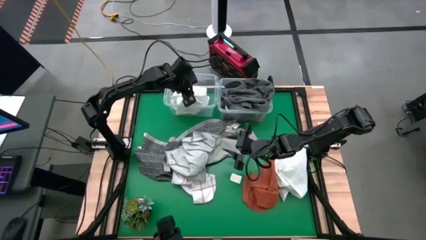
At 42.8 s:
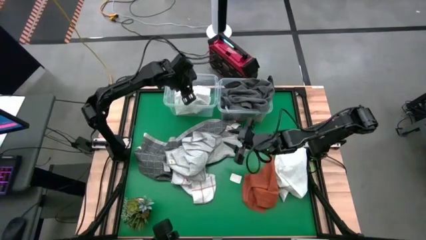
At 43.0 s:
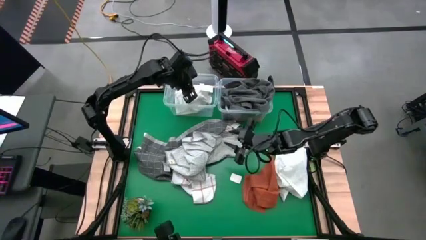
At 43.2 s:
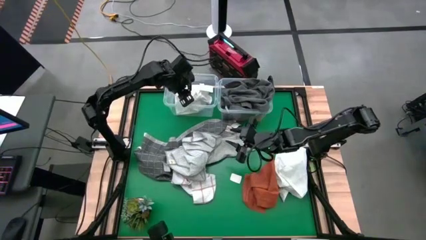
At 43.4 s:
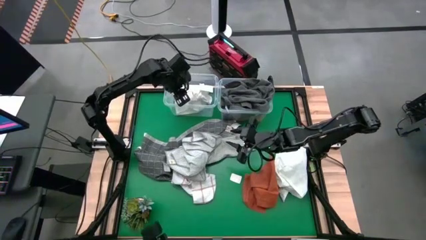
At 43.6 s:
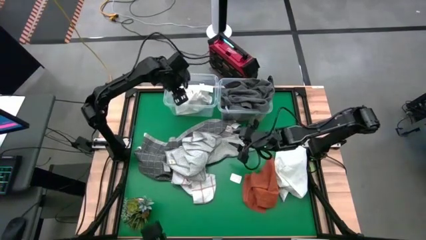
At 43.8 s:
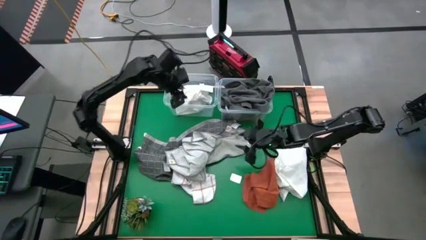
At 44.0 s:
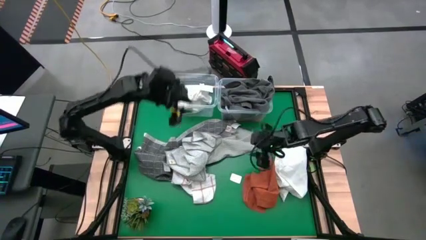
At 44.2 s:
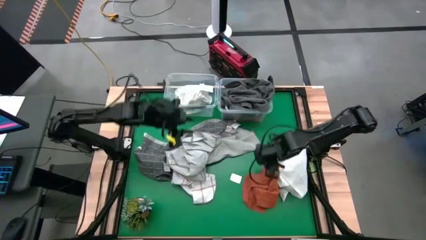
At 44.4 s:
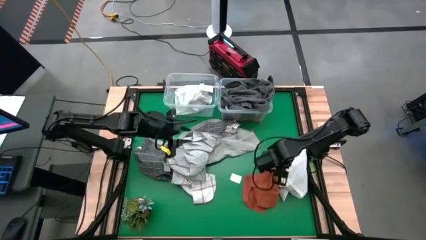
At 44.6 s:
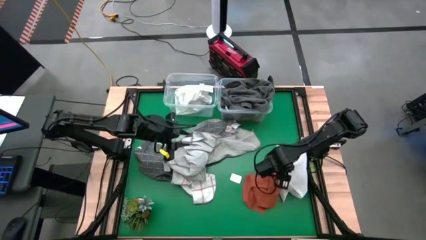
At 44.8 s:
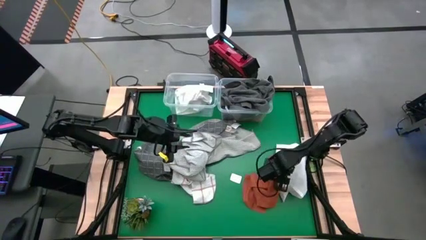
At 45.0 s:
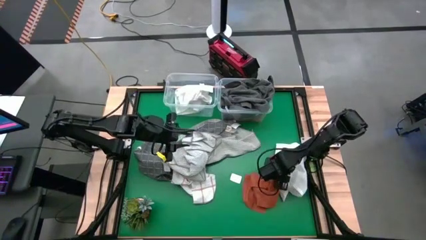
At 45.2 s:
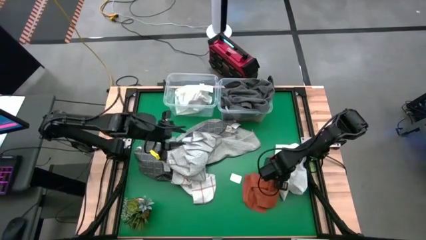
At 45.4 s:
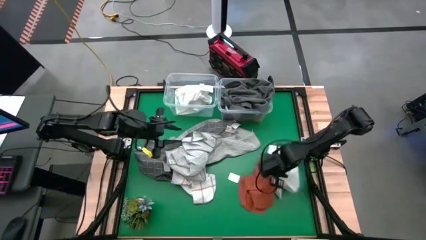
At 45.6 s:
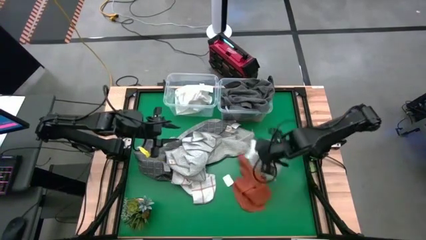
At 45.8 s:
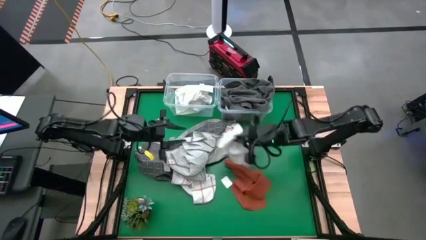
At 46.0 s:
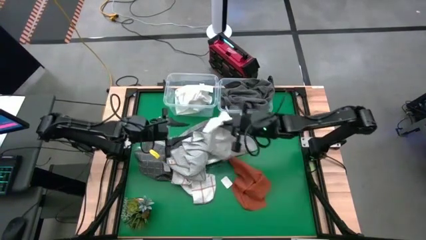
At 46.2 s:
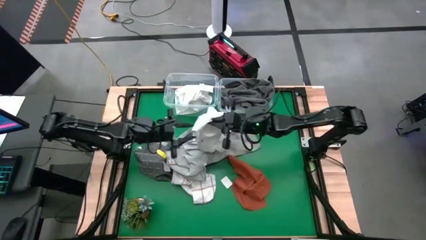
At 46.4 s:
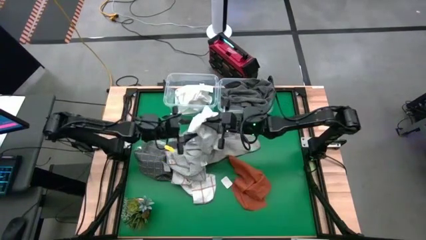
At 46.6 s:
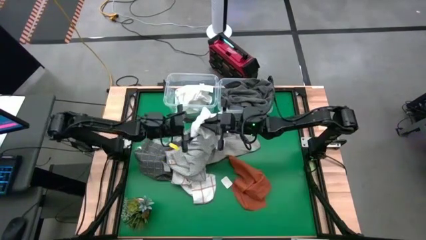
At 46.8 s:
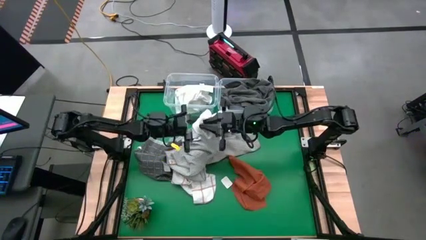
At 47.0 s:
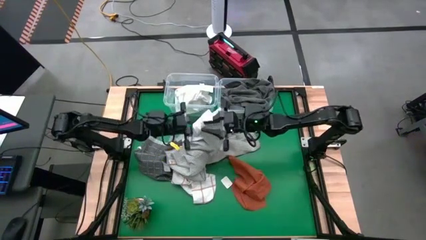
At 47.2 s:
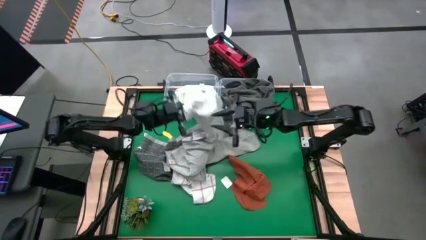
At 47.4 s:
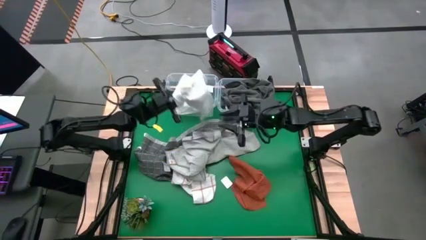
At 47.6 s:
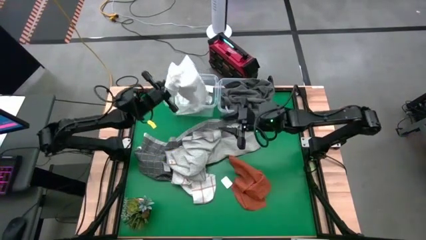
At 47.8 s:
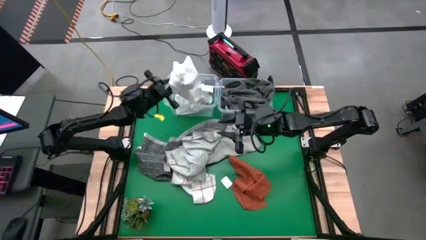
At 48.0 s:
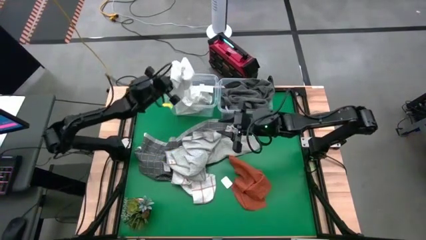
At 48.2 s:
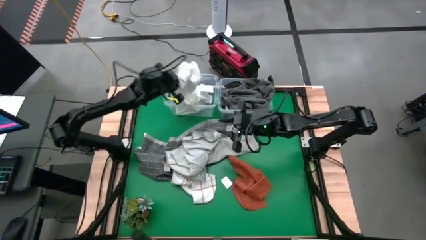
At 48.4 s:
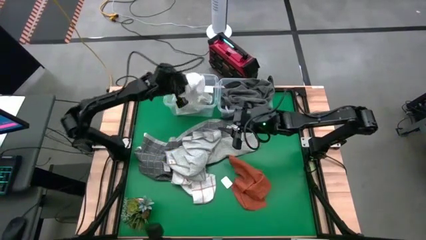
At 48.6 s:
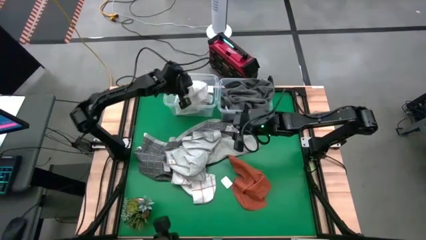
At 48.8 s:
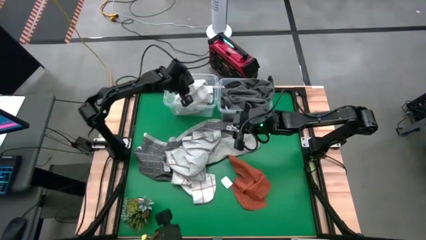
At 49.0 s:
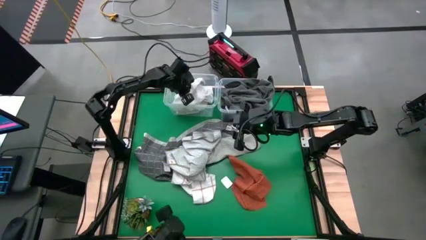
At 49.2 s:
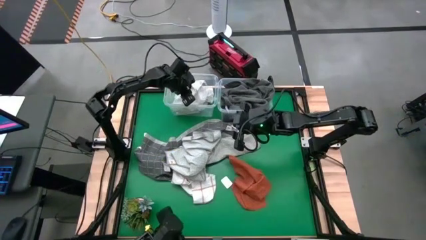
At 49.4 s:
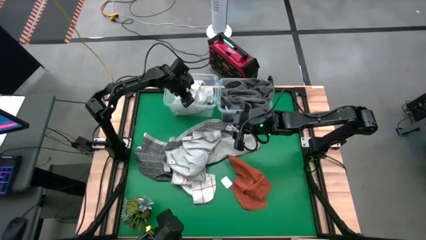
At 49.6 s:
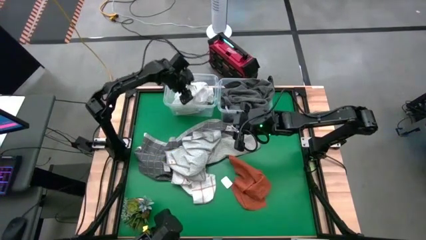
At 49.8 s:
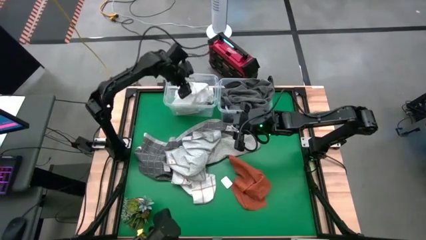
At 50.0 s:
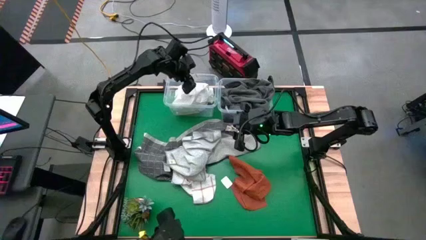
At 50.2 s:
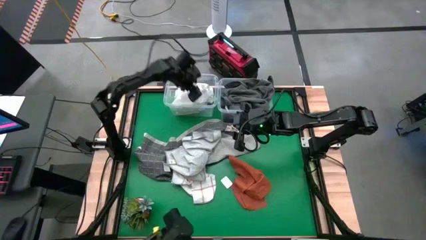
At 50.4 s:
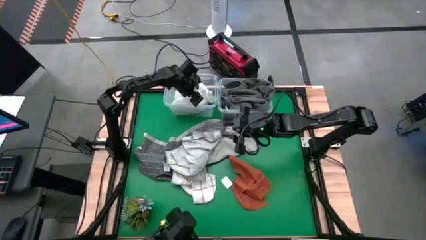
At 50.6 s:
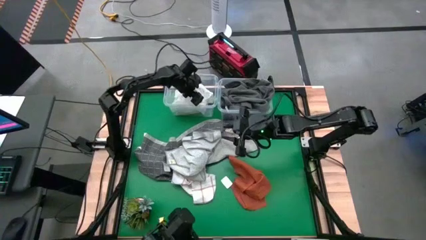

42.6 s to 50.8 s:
Task: Sort towels by color in basket
Put the white towel into the left transparent bin

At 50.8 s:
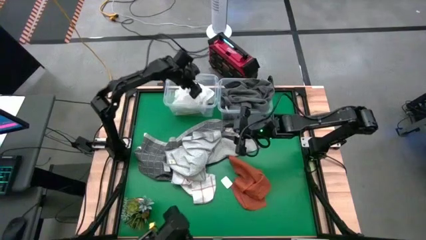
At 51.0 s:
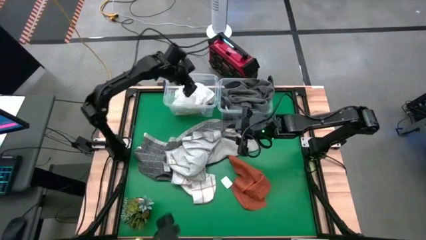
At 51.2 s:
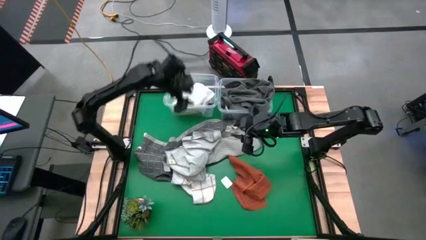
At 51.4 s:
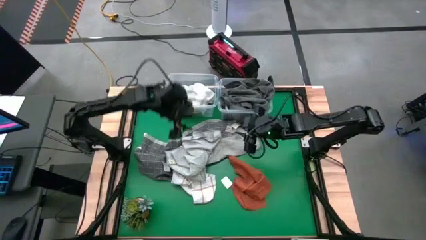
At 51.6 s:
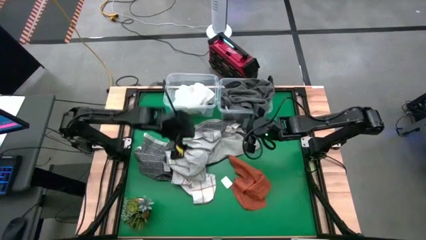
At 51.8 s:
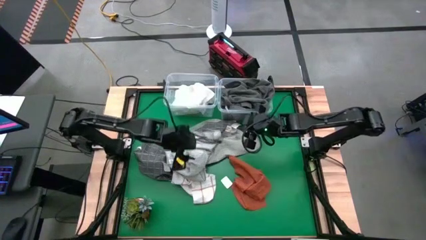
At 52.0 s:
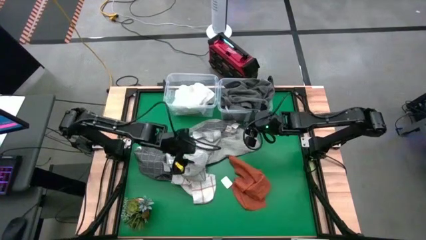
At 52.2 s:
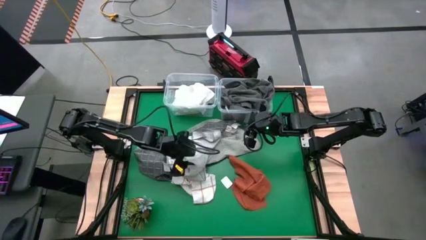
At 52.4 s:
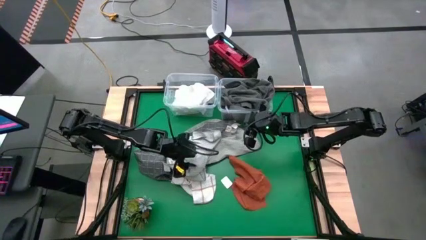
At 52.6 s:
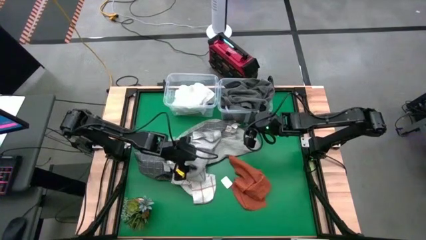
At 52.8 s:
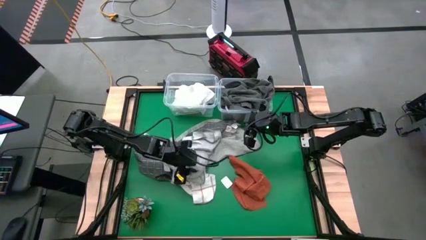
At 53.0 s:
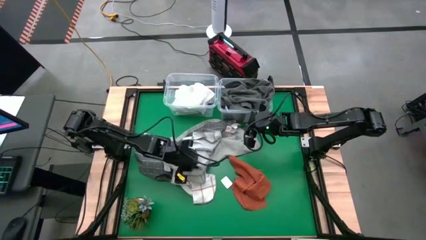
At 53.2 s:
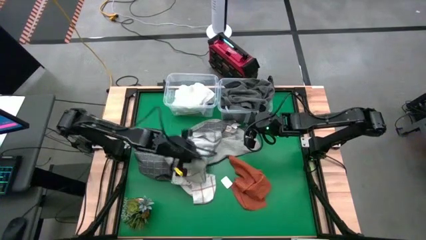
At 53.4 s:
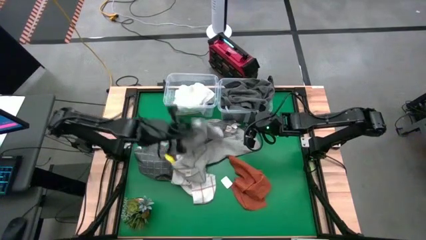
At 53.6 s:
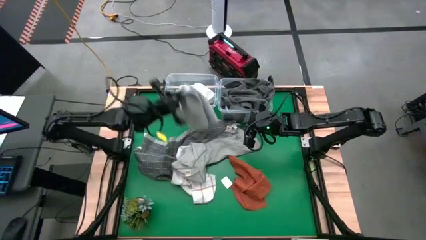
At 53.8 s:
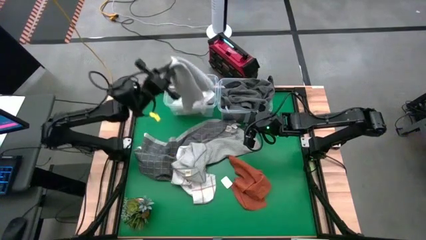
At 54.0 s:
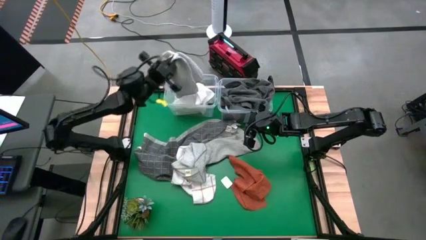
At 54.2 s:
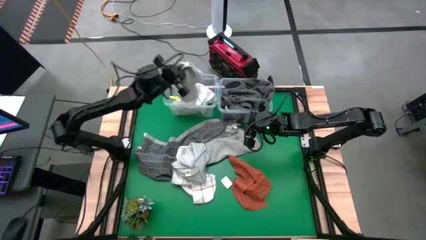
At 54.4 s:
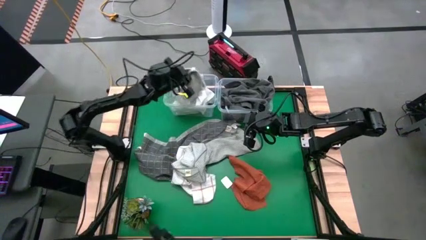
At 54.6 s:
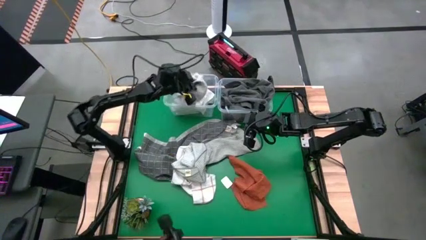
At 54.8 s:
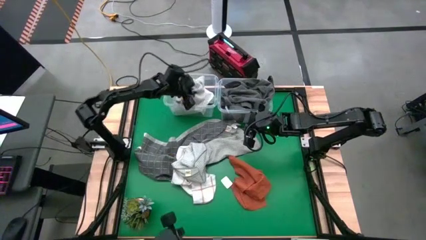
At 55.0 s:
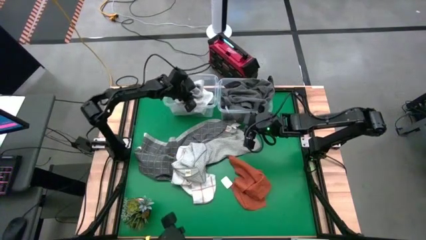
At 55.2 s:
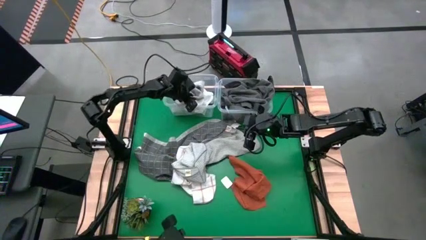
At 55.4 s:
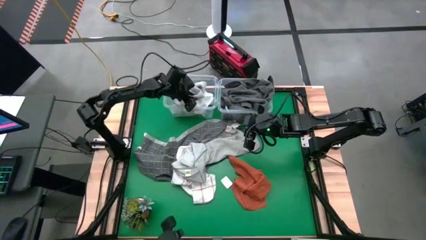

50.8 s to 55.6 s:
Put the gray towel into the left transparent bin

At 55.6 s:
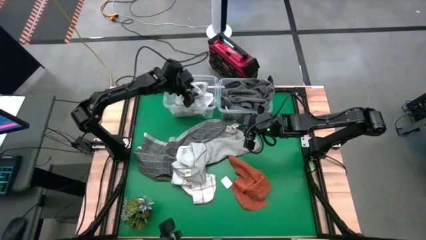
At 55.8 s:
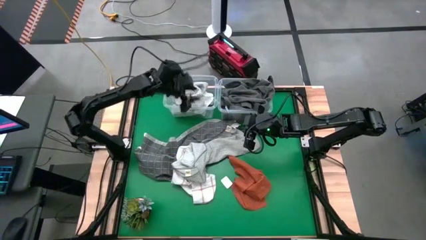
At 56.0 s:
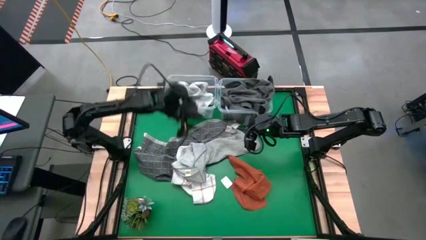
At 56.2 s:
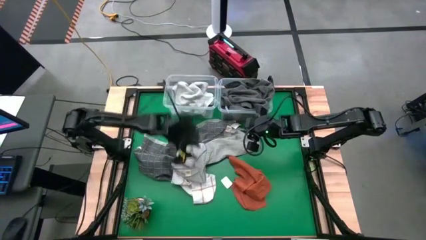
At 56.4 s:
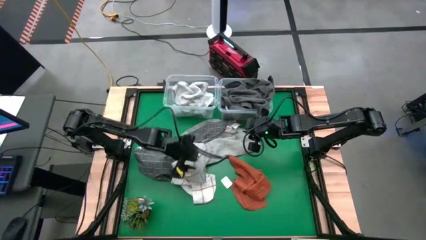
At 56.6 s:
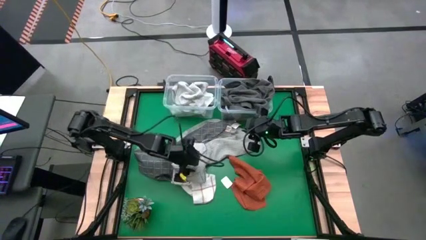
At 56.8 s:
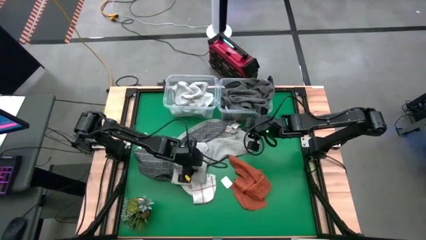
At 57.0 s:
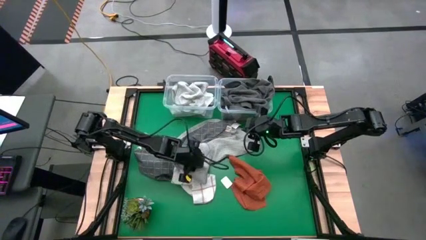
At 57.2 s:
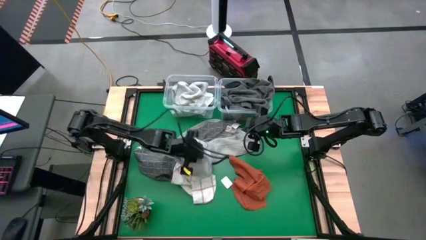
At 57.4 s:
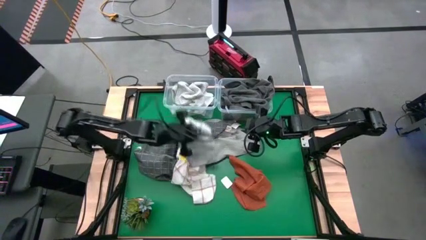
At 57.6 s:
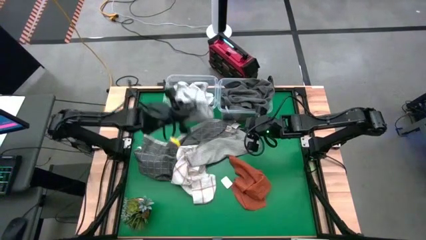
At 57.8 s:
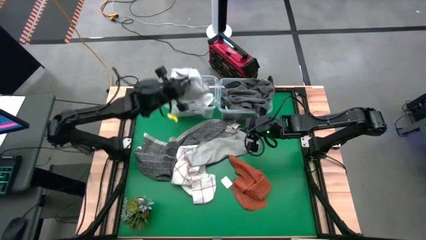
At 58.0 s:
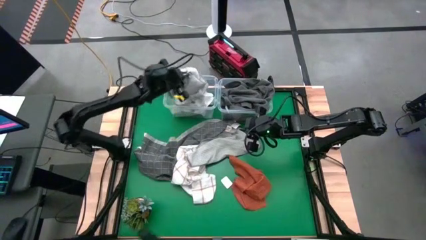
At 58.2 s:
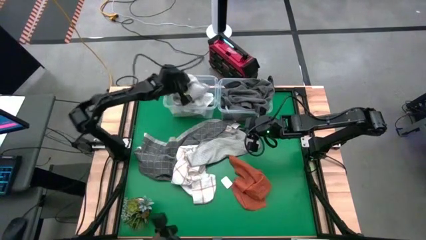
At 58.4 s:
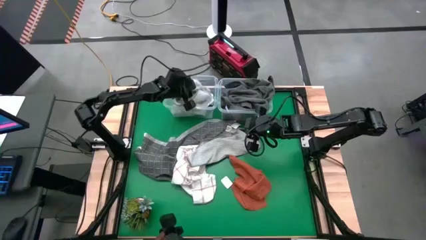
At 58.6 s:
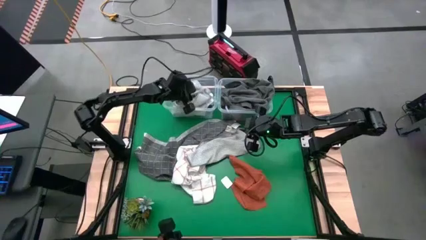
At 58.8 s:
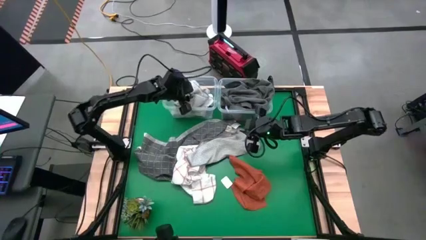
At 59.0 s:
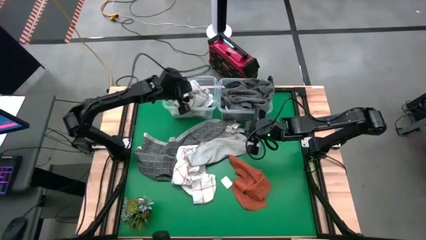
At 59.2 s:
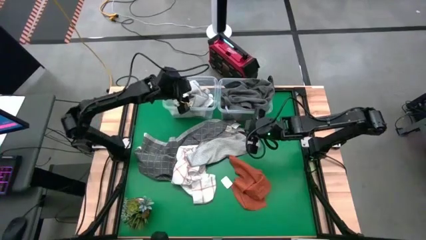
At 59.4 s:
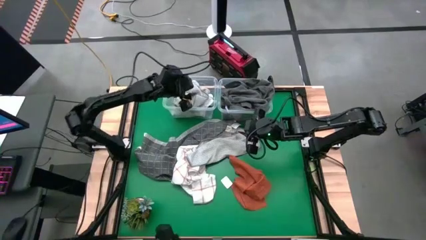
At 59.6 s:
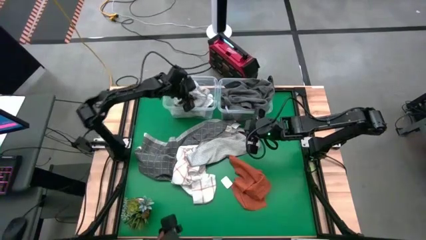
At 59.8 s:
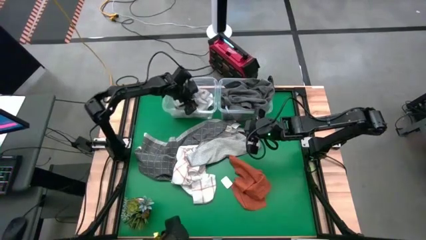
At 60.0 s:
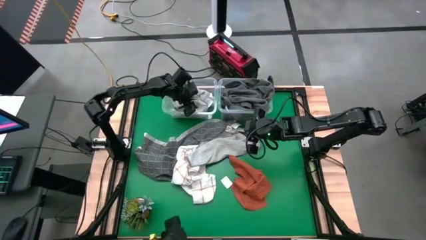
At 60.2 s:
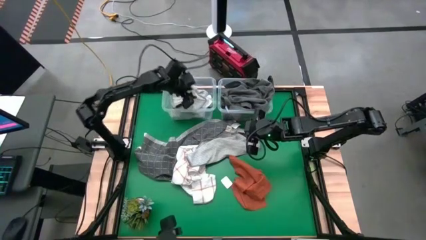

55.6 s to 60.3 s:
Put the gray towel into the left transparent bin
